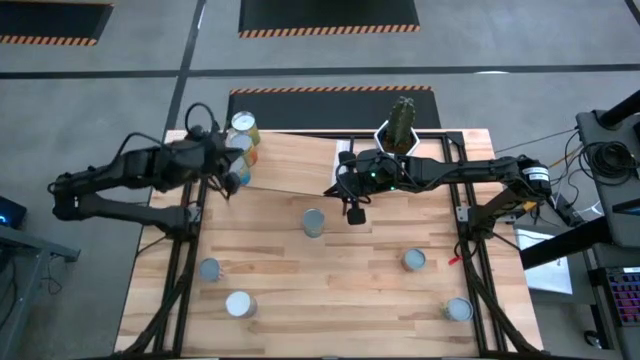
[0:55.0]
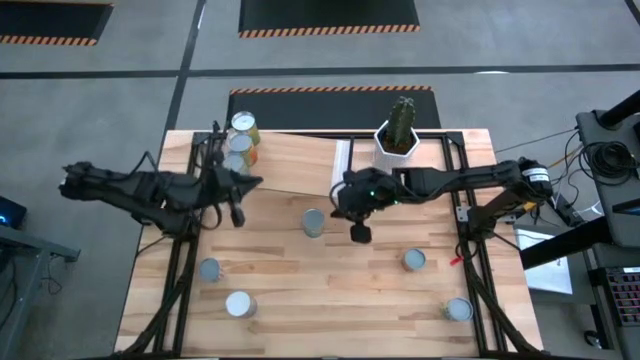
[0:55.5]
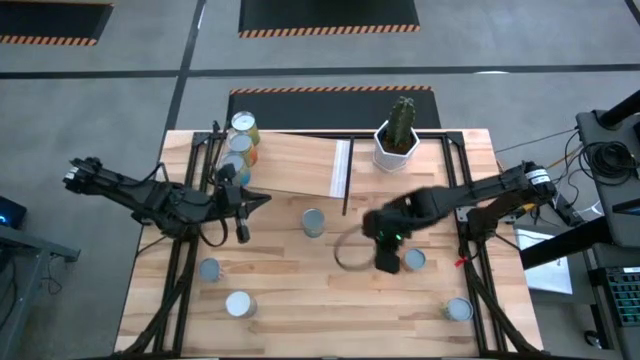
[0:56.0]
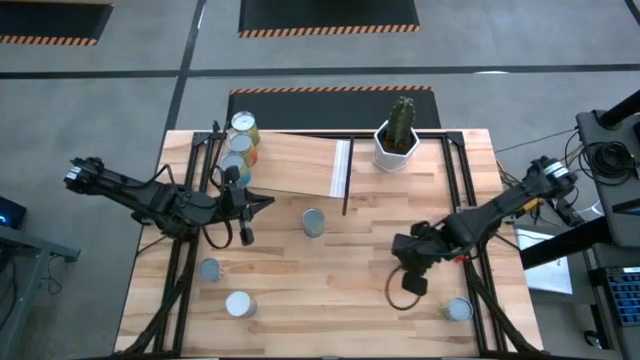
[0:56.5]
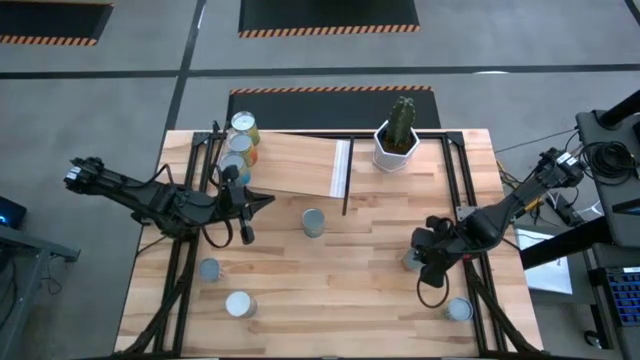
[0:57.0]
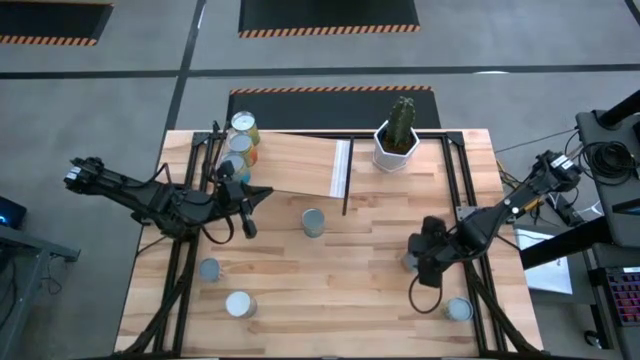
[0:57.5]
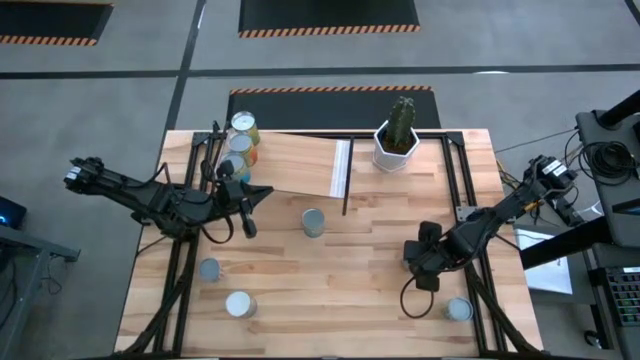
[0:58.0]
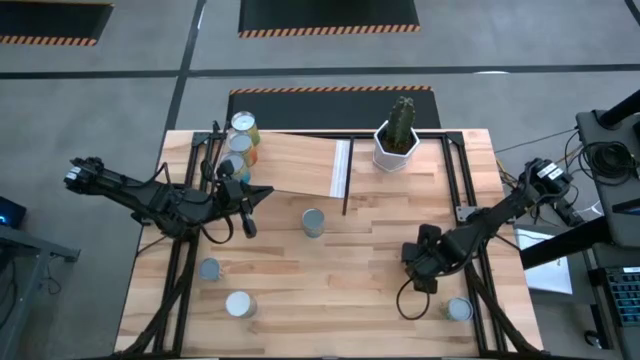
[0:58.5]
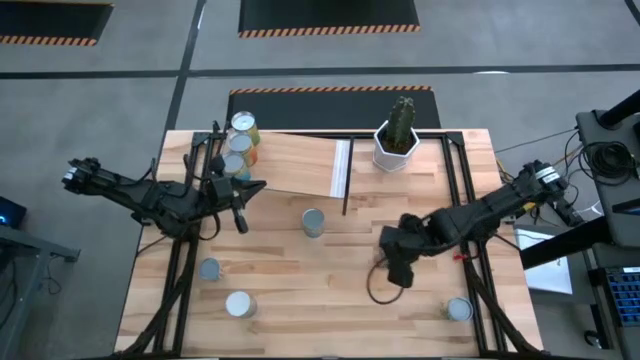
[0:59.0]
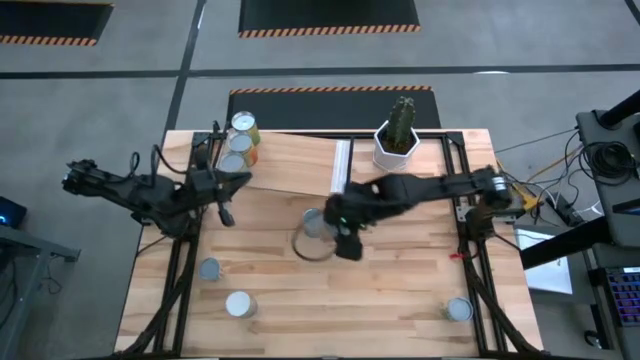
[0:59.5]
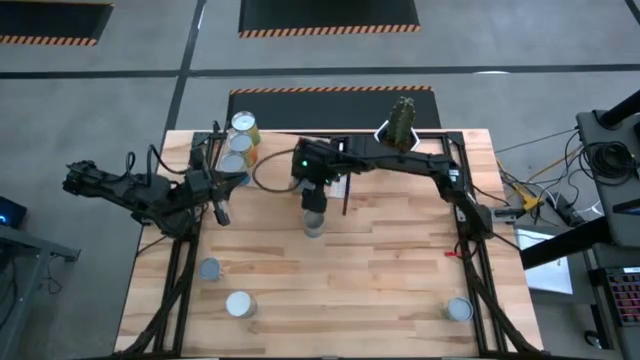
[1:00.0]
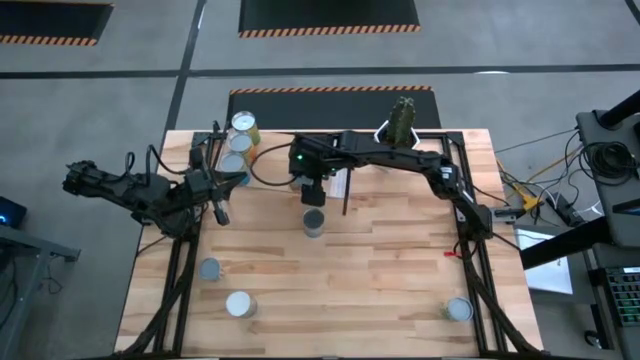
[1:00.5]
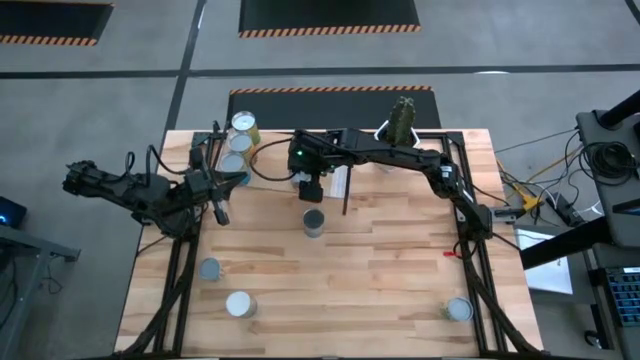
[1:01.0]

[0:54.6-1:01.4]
Task: Pick and place cans onto a shelf
Put the small canned oranges on the shelf

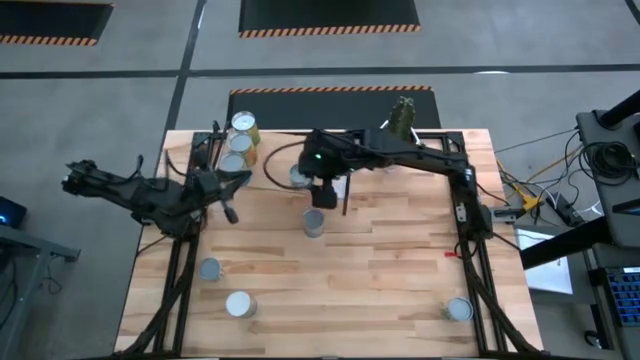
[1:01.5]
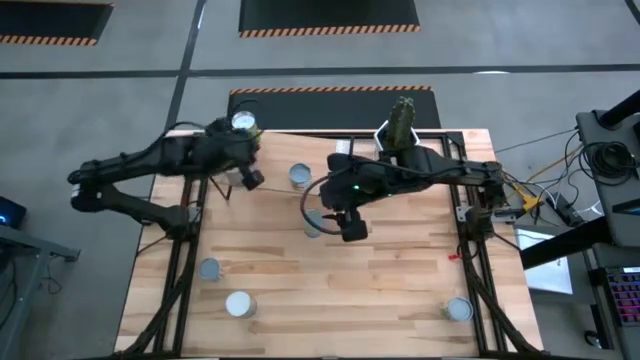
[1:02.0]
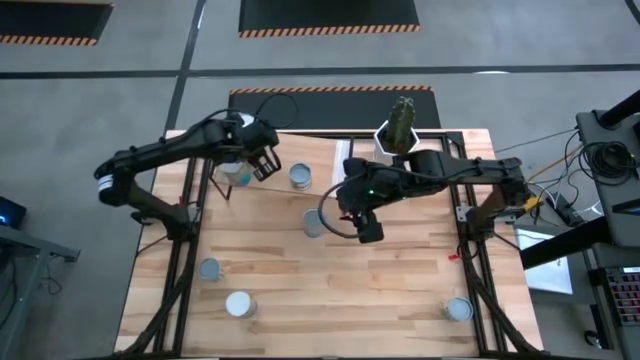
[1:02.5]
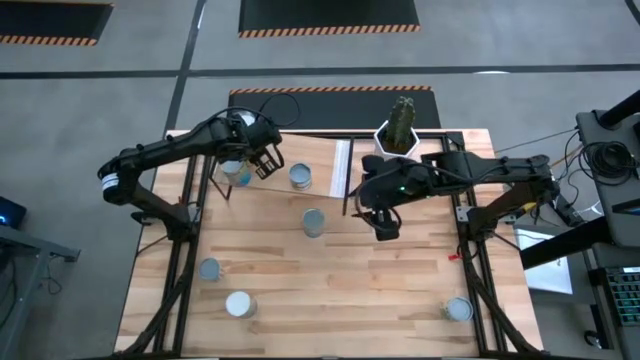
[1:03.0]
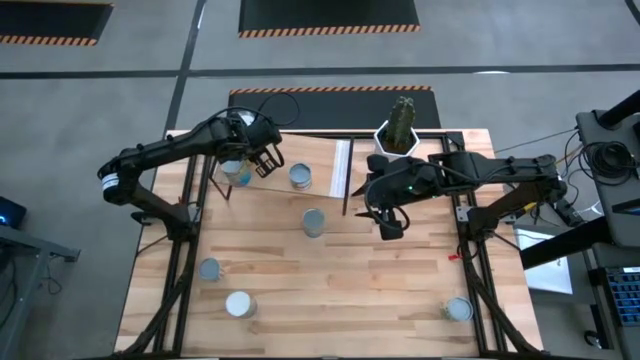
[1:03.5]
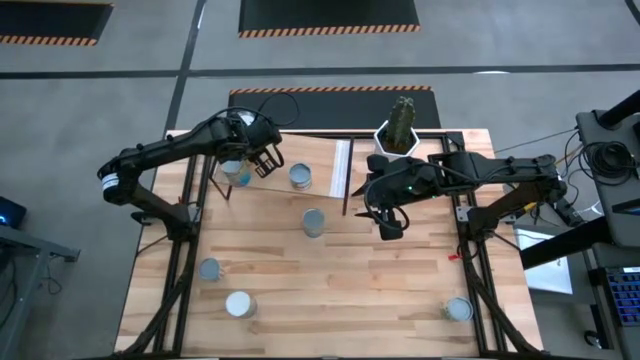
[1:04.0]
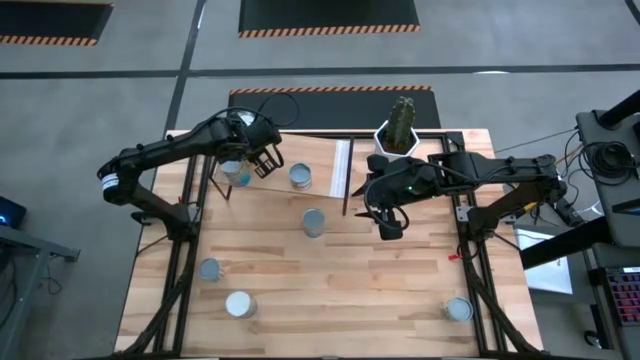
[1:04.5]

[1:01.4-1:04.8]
Adjust the canned pineapple on the shelf

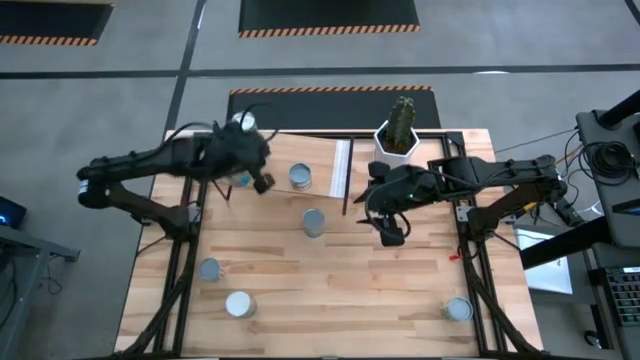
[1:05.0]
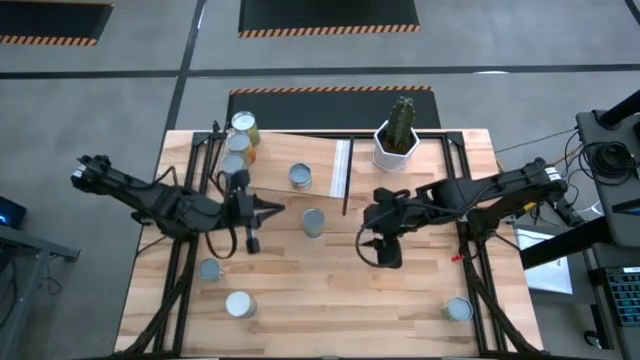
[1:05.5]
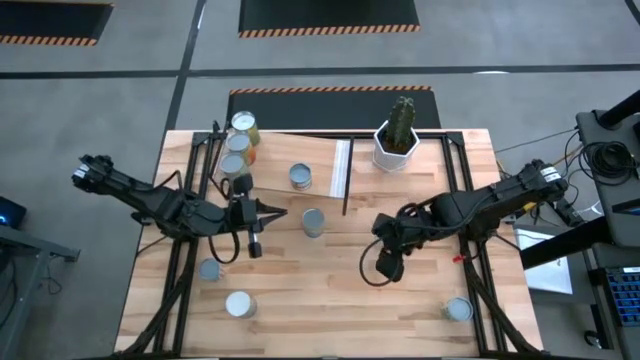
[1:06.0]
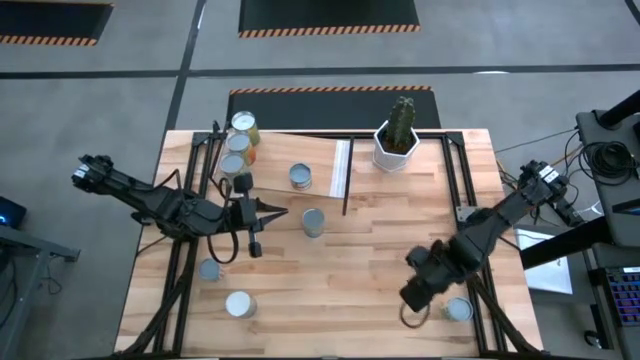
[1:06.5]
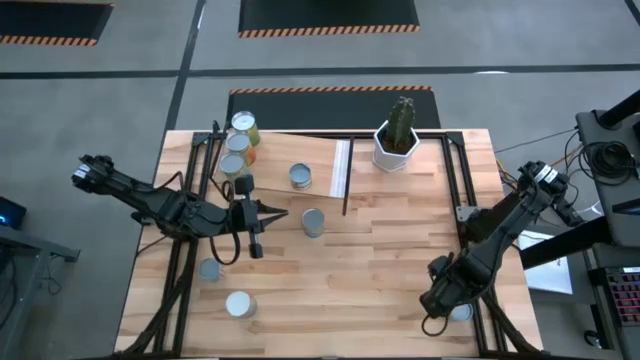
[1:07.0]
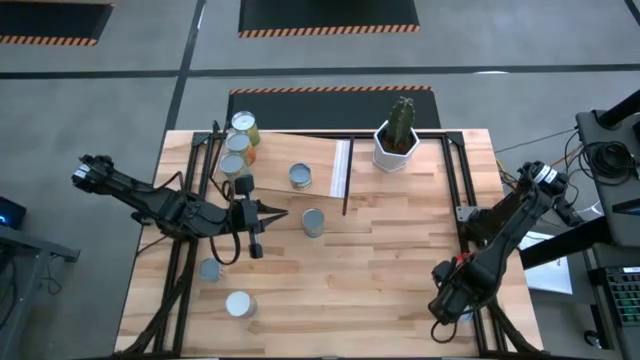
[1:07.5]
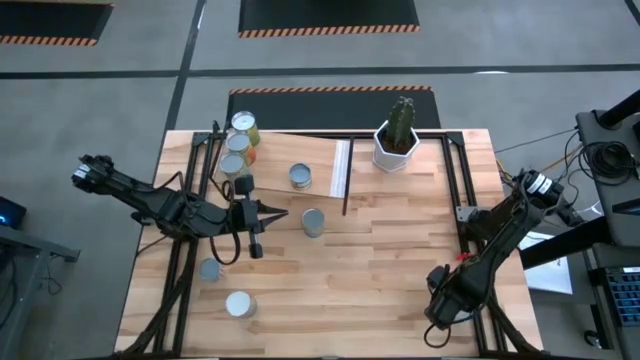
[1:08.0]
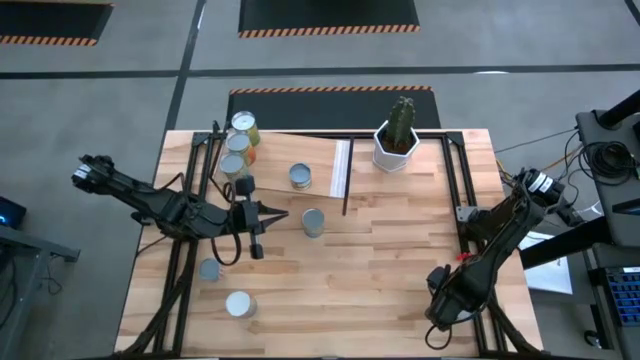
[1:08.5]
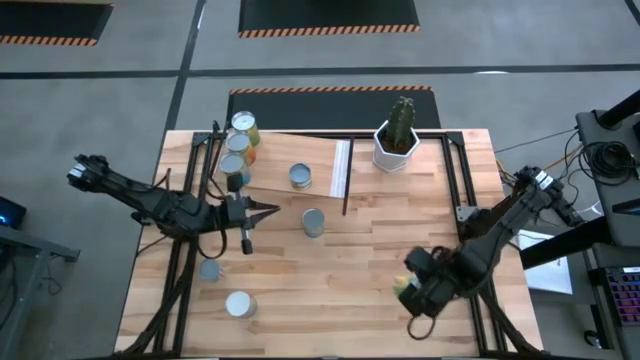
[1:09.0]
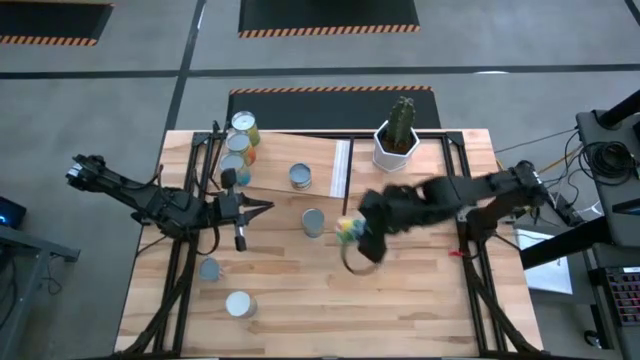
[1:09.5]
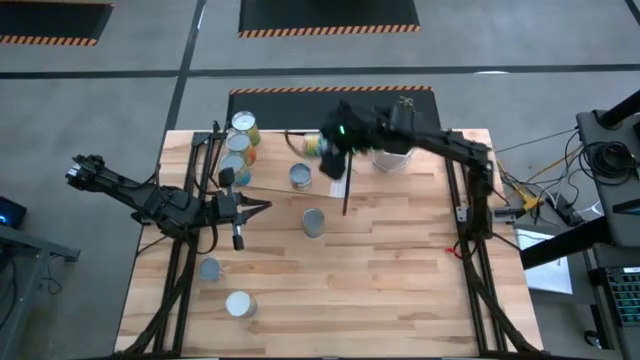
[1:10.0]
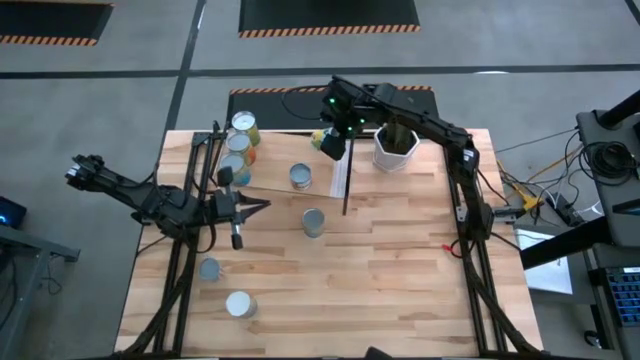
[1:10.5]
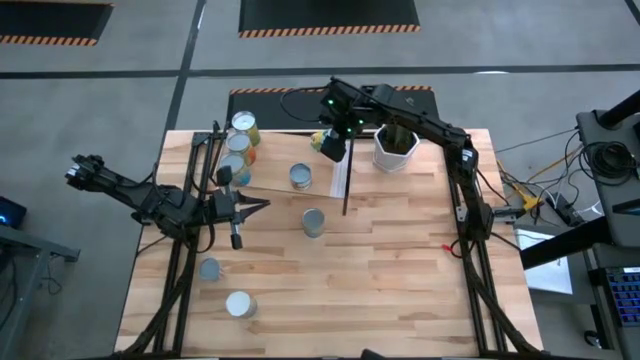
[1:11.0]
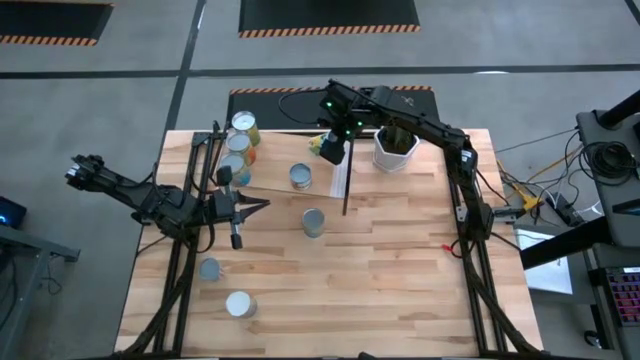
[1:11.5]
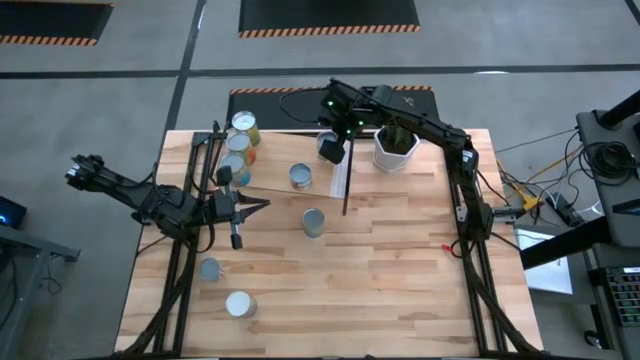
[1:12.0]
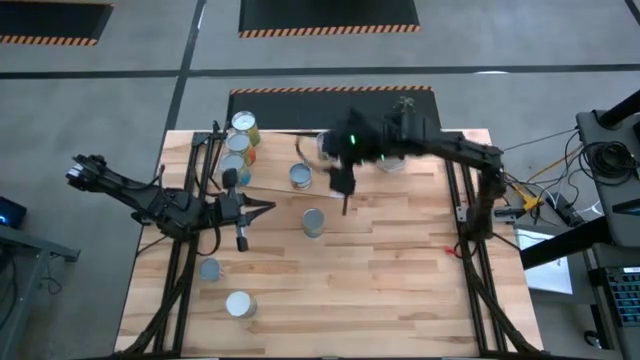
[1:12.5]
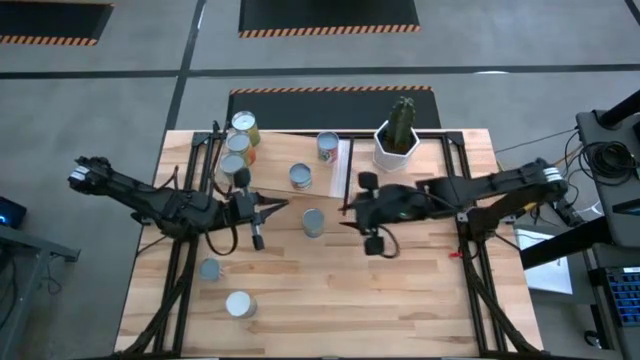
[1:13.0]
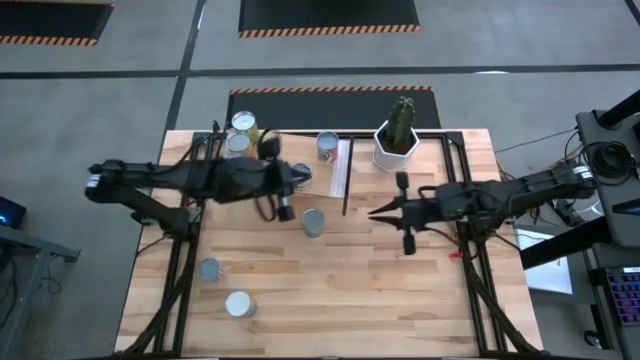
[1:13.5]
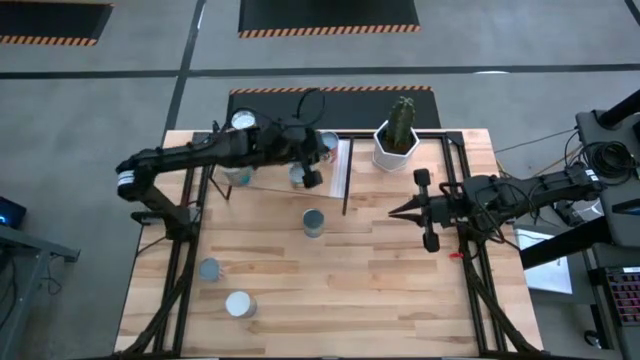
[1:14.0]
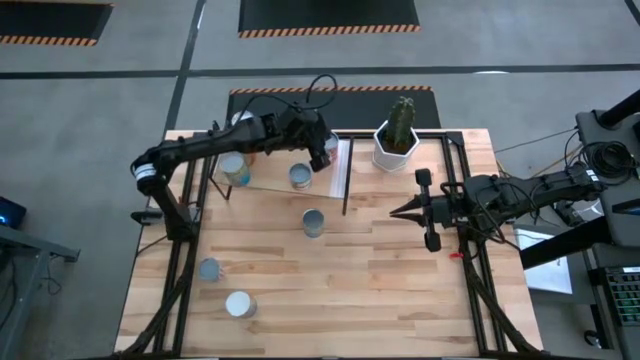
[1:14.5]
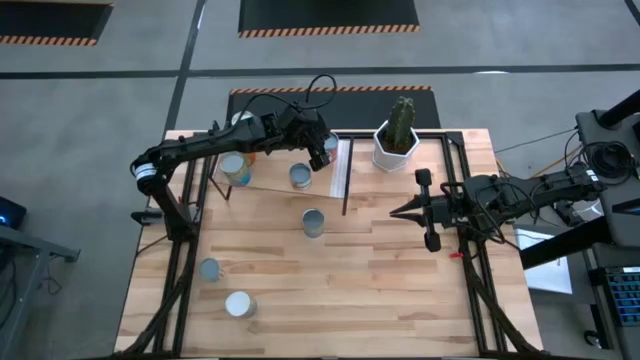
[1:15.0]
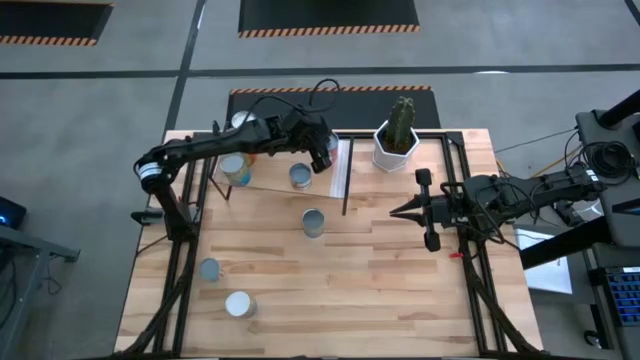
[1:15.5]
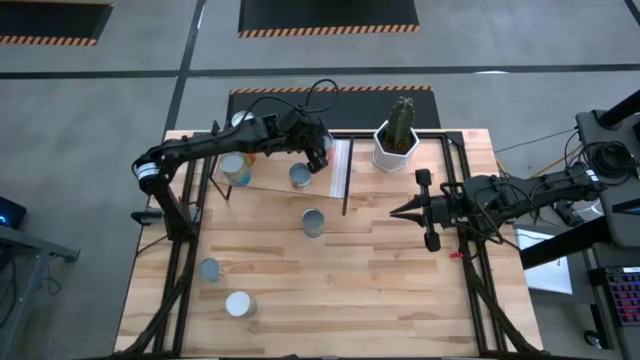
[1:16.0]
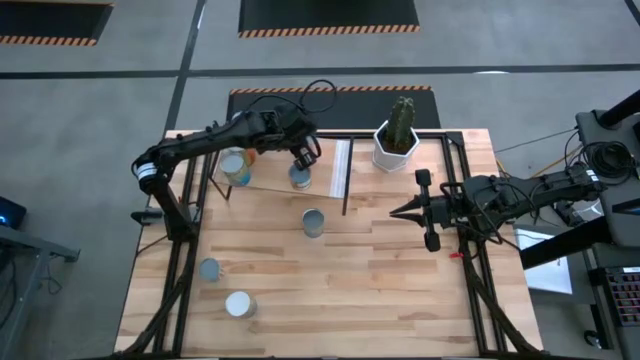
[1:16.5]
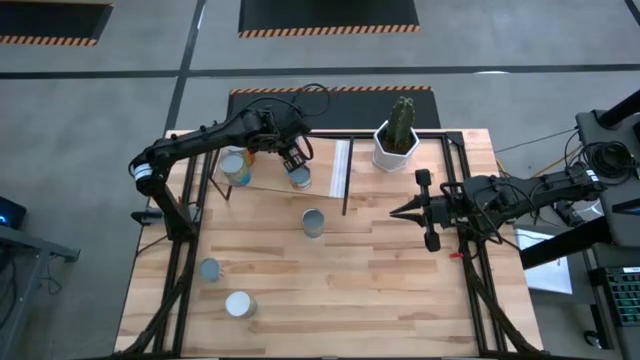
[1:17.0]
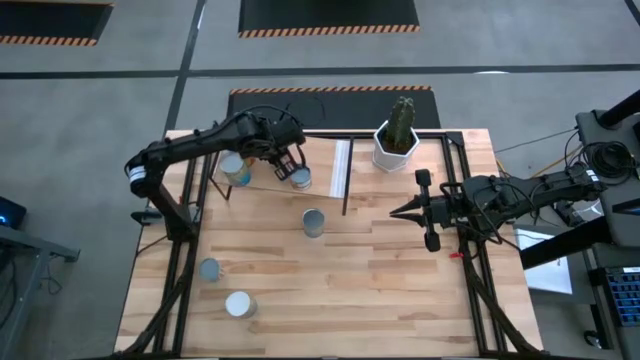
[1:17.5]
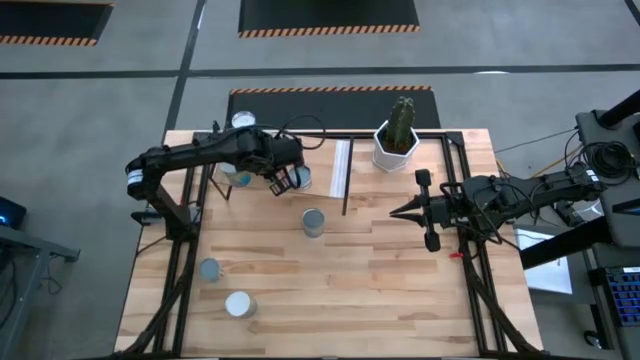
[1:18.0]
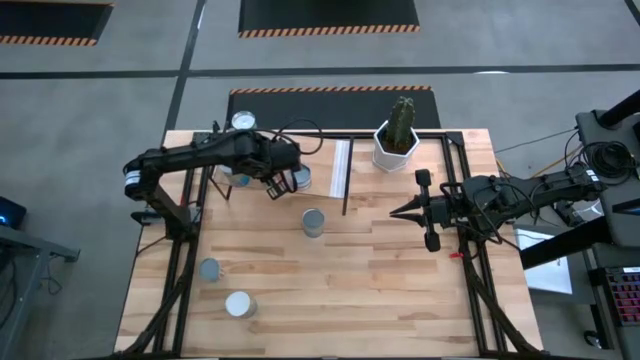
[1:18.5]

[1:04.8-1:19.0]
Put the canned mixed fruits on the shelf
